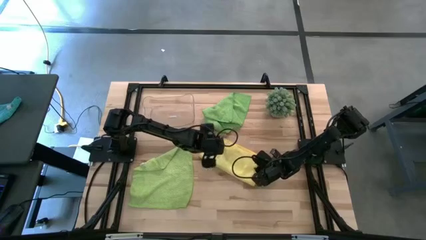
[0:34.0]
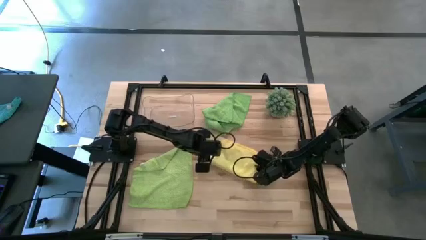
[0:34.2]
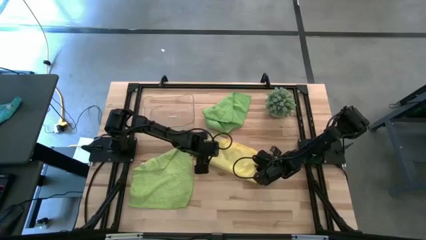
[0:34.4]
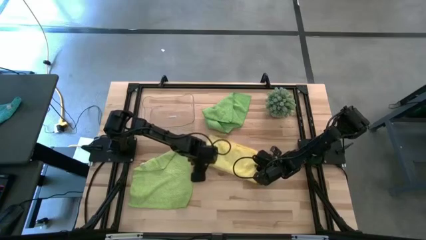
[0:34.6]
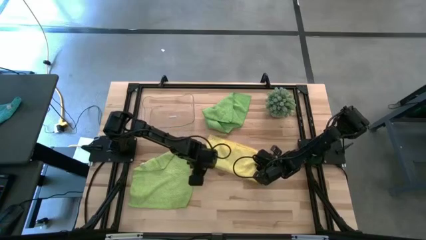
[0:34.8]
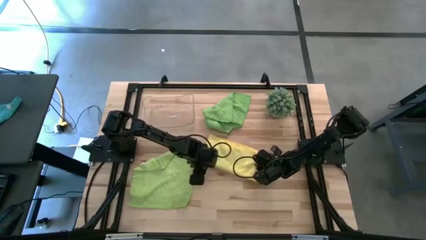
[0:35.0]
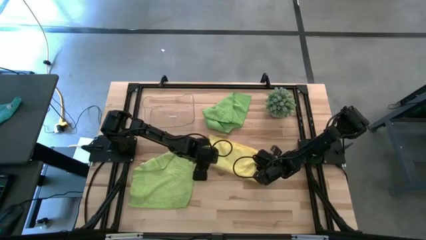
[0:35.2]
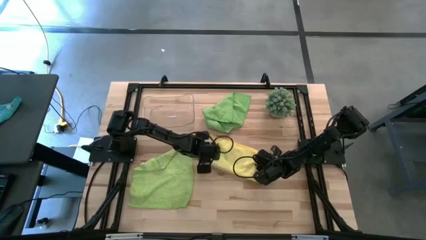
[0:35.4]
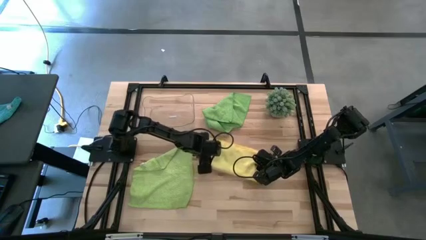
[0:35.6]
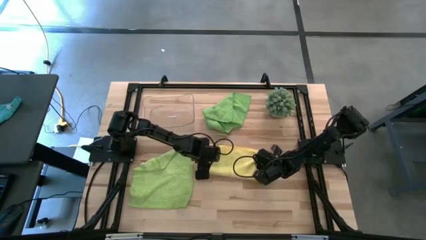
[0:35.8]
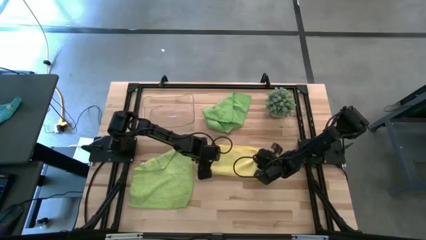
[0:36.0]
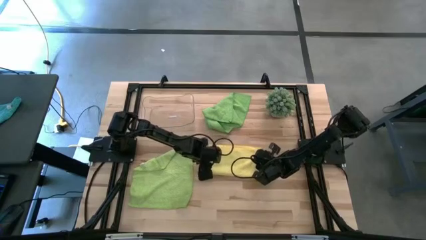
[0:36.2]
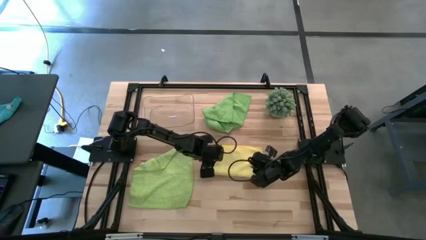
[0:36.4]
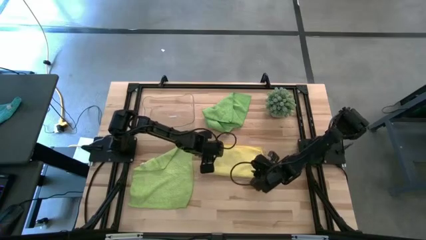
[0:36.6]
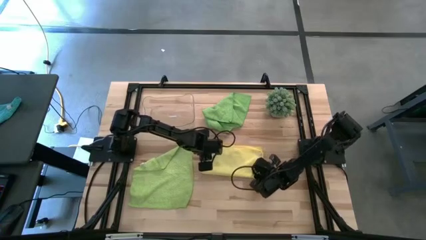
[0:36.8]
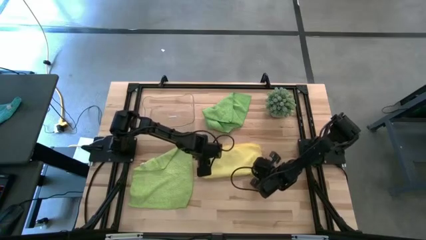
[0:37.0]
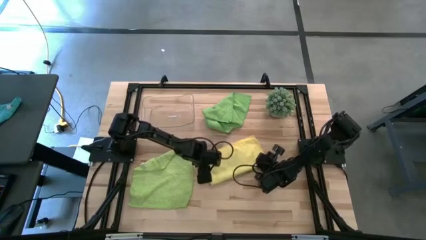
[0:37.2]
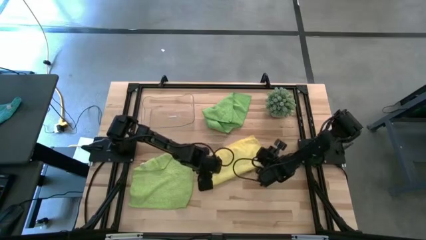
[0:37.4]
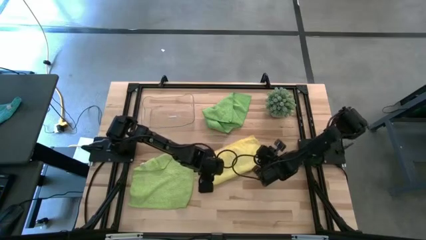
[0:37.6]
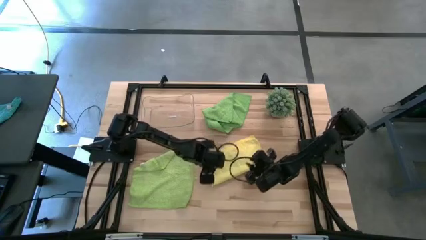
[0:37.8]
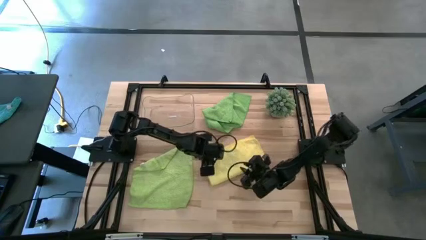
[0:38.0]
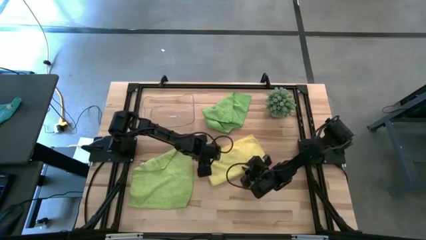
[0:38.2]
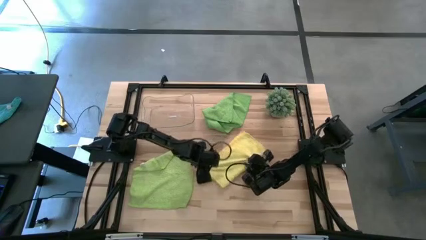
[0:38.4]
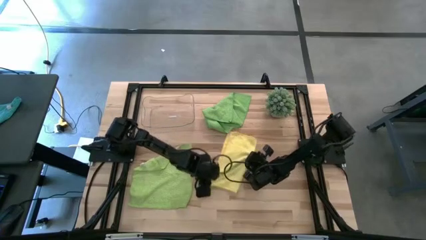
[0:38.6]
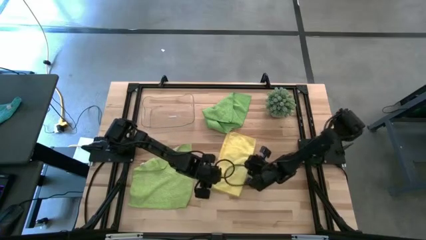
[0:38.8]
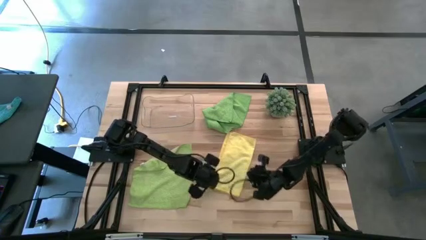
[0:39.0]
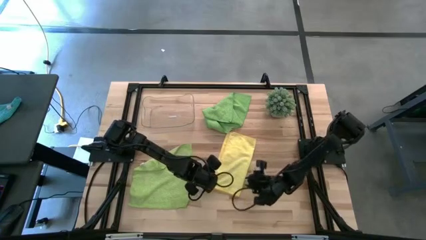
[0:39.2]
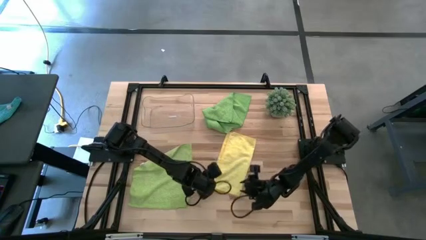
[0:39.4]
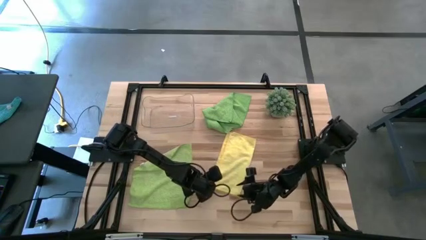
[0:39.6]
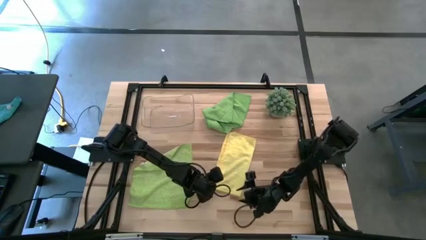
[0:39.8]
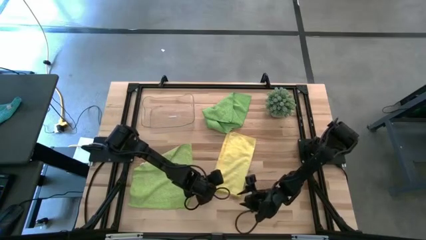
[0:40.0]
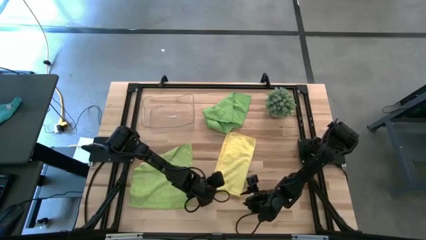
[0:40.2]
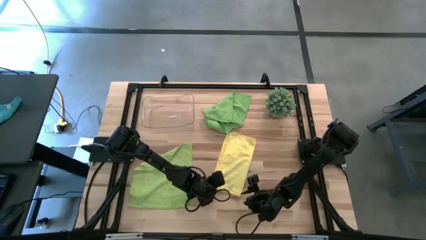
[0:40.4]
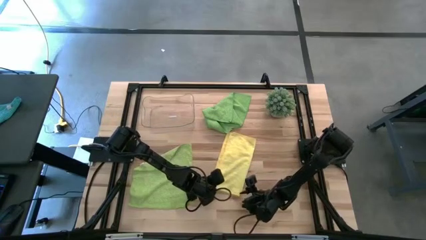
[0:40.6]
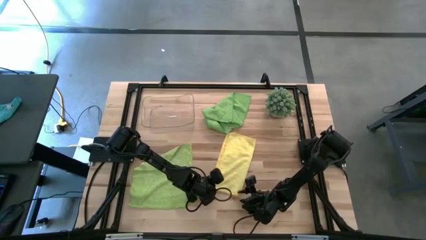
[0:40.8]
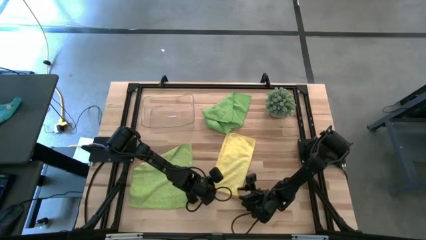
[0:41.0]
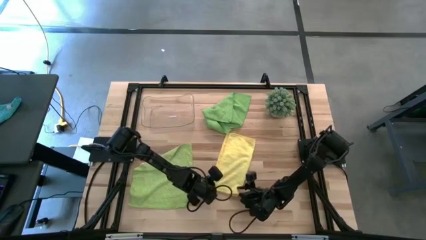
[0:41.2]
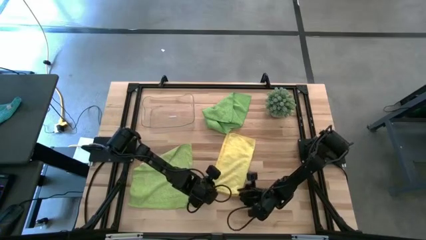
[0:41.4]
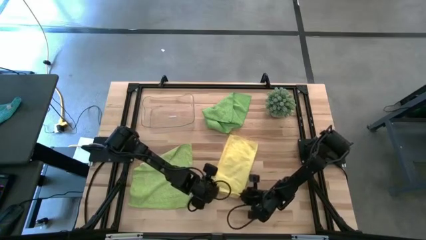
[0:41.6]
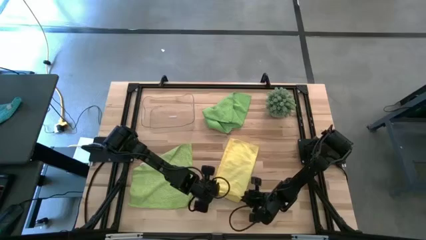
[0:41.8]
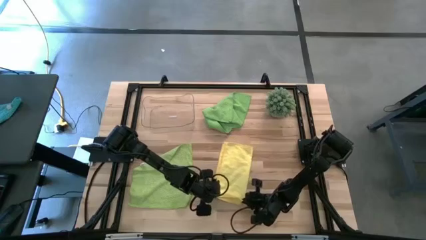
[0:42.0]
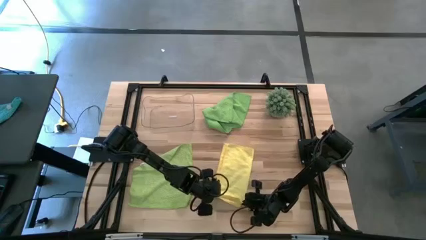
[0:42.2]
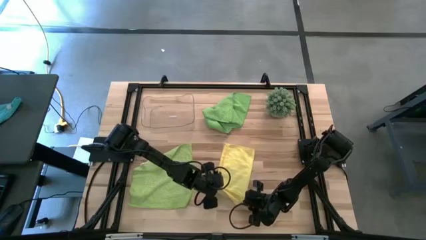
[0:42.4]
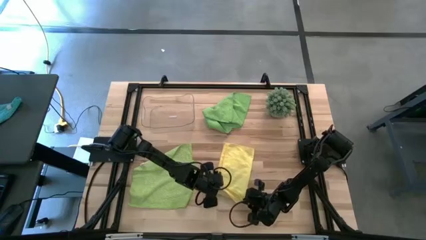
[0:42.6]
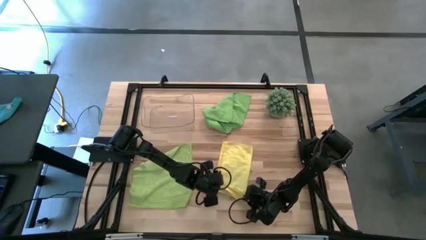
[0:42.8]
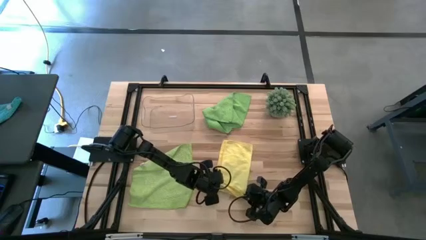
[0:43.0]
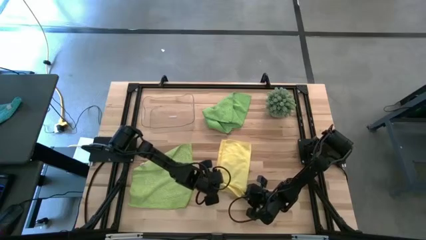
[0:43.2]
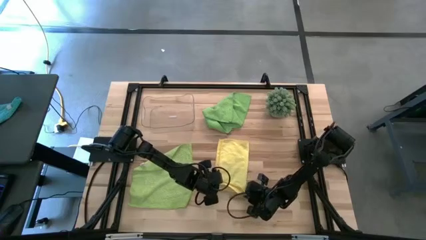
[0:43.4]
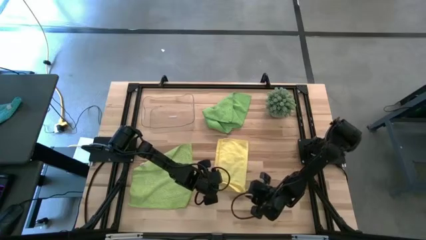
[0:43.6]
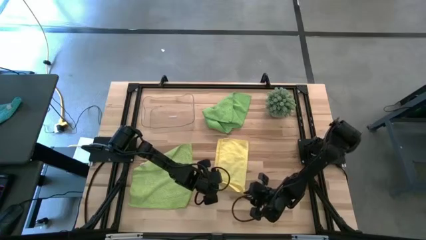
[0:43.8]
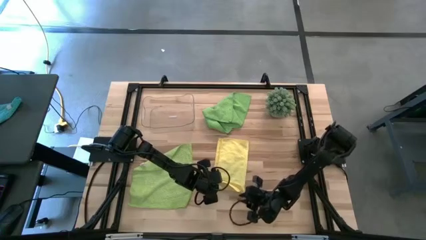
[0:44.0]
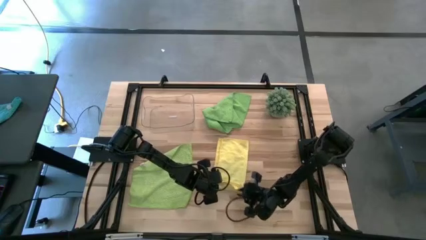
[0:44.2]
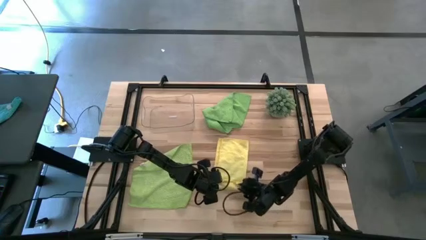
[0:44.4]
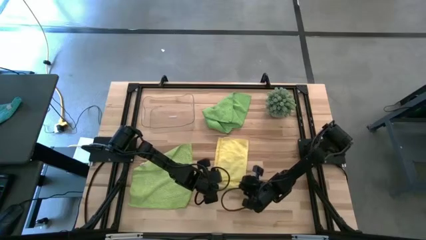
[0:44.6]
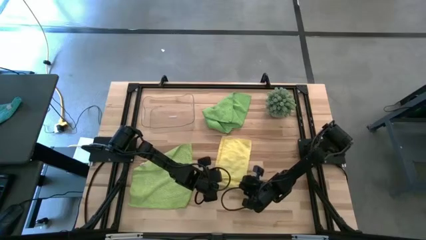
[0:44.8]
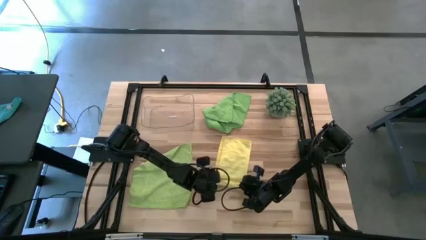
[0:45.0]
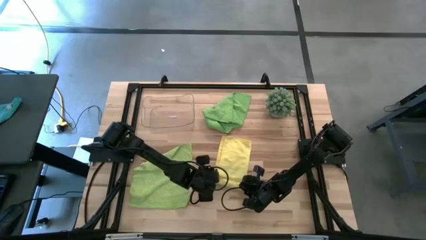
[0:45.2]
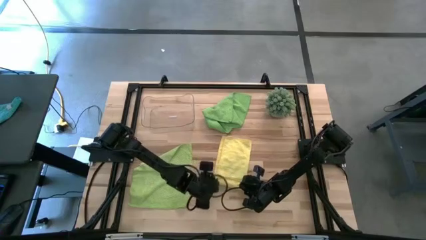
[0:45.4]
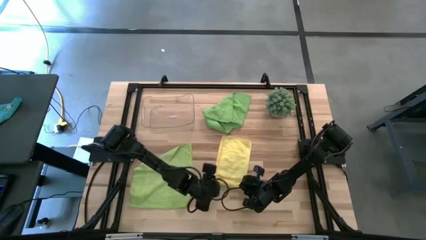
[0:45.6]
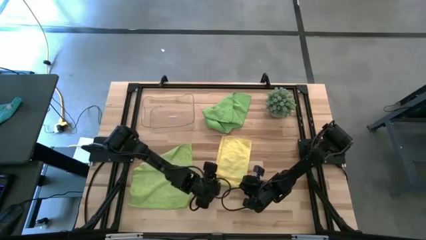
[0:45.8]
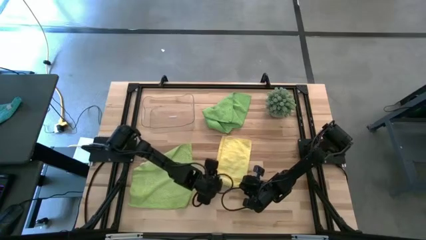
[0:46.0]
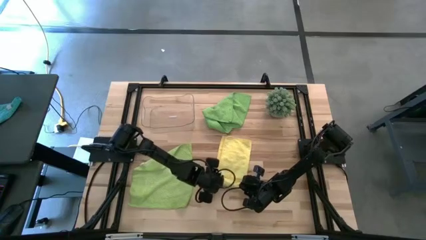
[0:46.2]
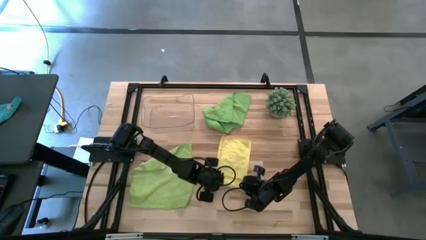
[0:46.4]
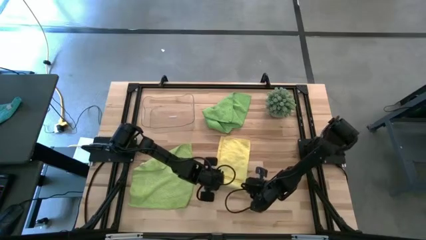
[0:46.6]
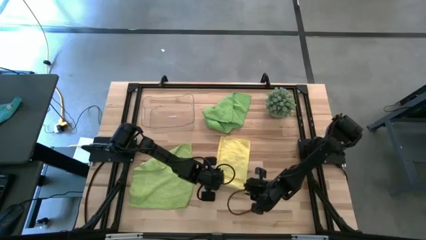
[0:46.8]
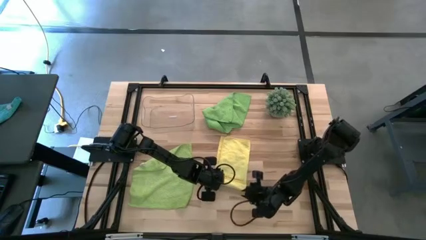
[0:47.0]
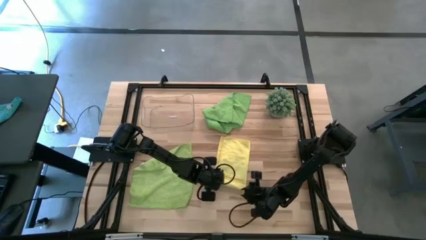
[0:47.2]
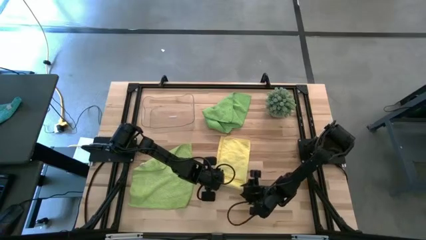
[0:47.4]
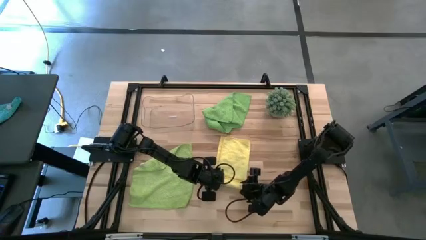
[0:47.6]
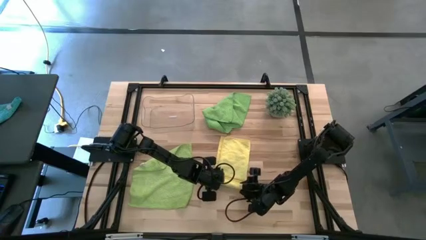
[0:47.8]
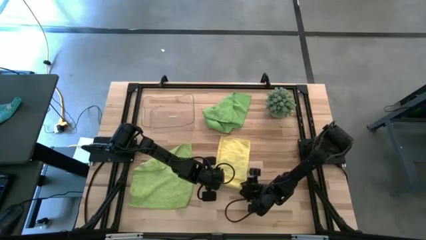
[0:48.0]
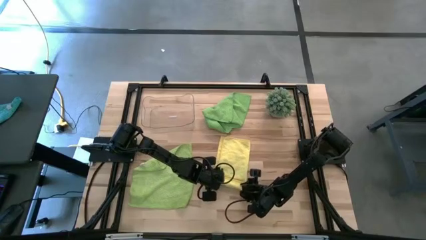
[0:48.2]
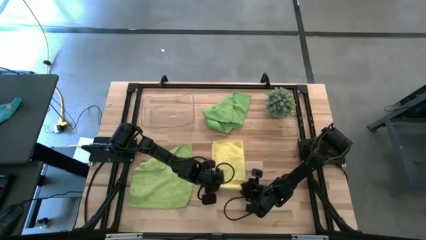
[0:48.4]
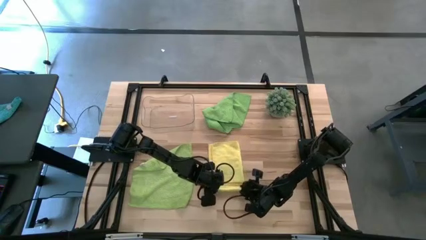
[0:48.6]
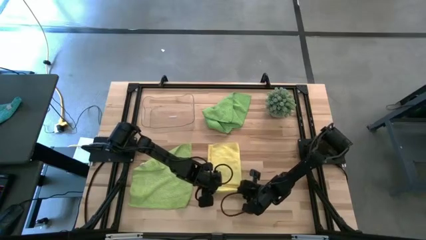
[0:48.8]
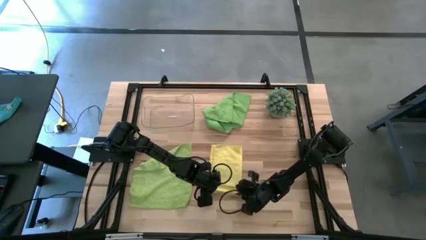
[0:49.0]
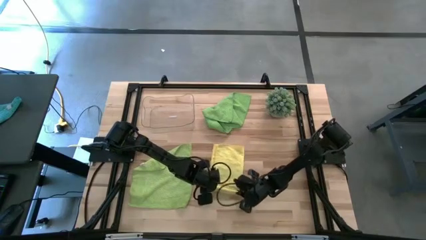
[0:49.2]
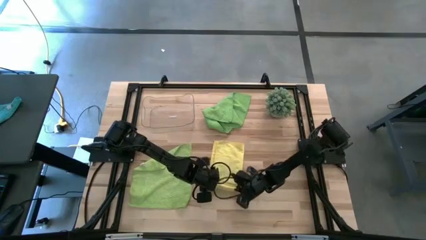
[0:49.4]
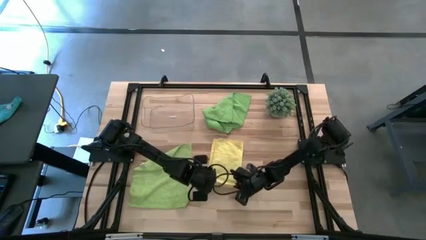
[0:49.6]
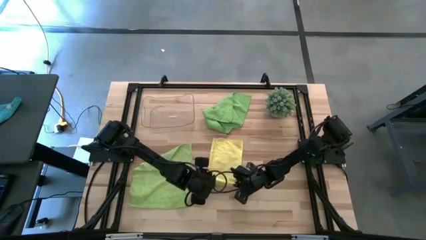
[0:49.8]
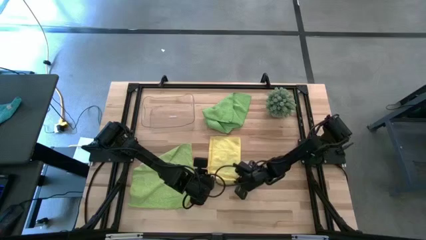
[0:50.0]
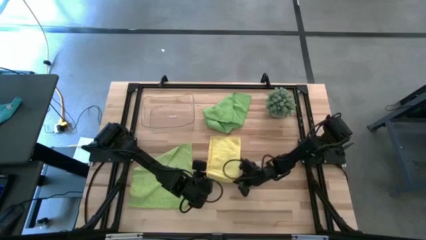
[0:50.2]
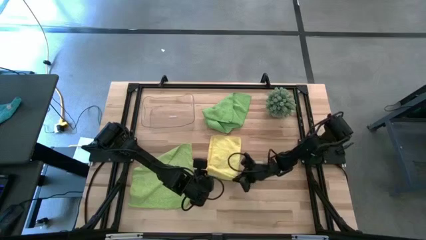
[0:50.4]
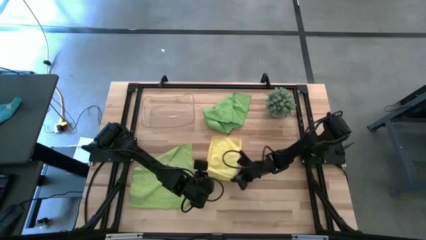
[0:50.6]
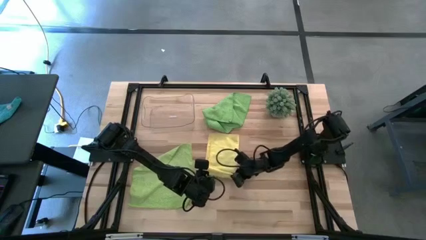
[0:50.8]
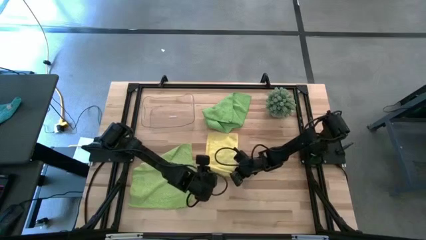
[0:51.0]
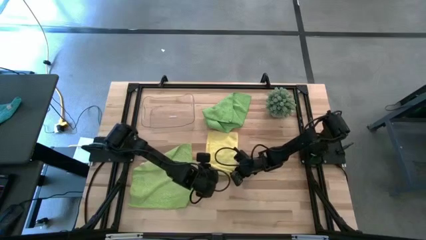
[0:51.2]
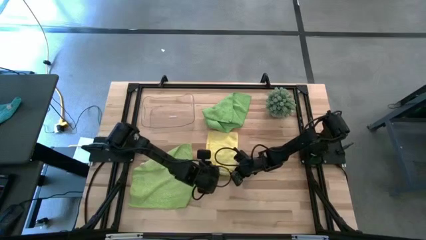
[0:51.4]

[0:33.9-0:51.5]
Task: Roll microfiber towels into tight, uniform cylinder then place into a basket
Roll the yellow towel
